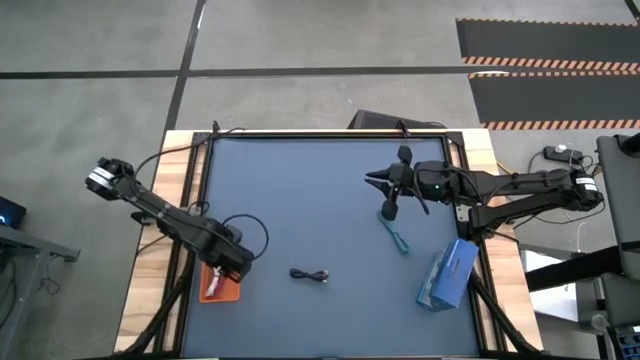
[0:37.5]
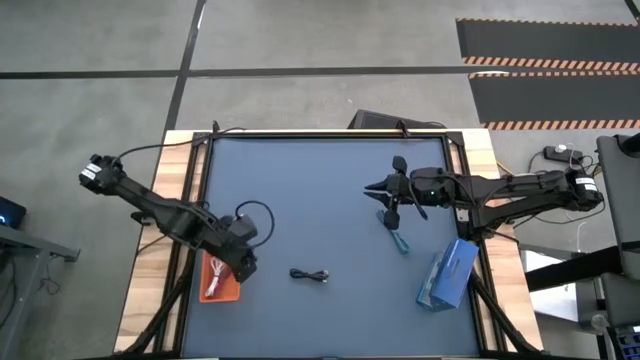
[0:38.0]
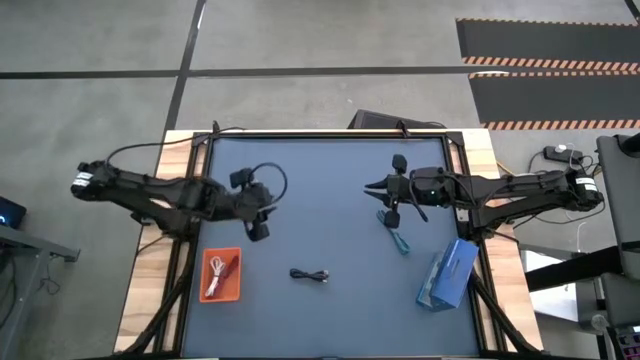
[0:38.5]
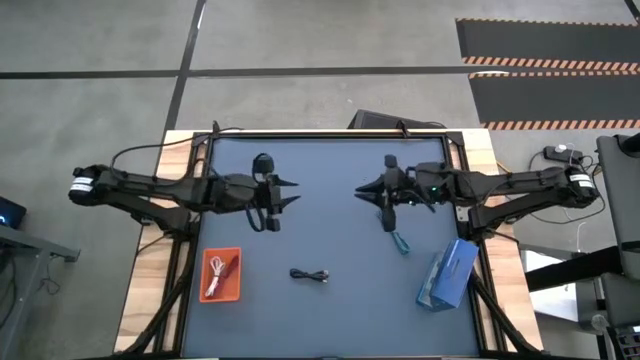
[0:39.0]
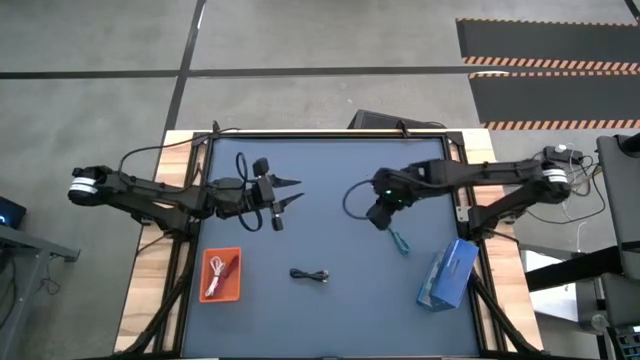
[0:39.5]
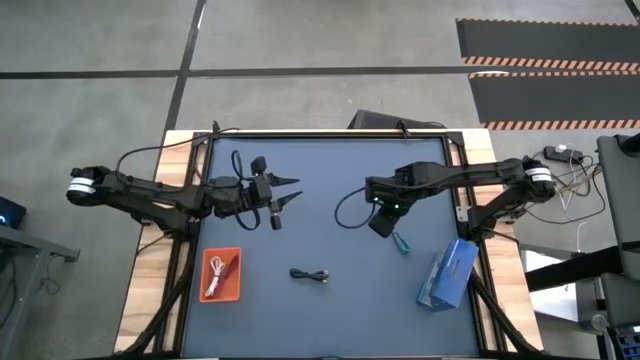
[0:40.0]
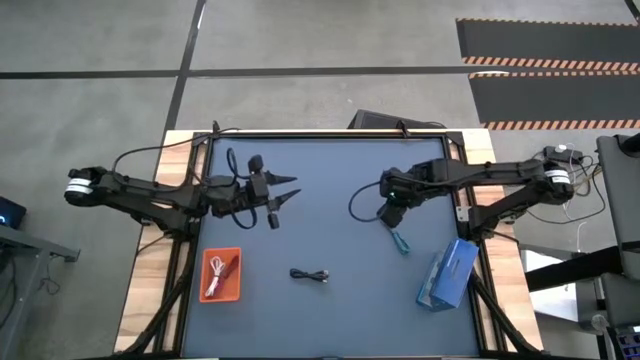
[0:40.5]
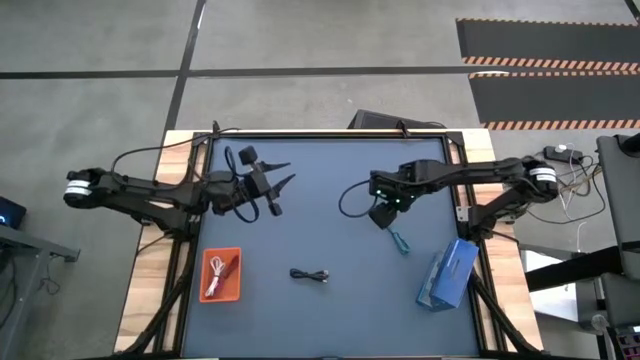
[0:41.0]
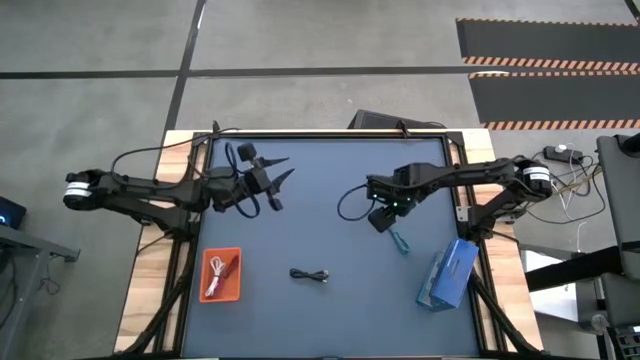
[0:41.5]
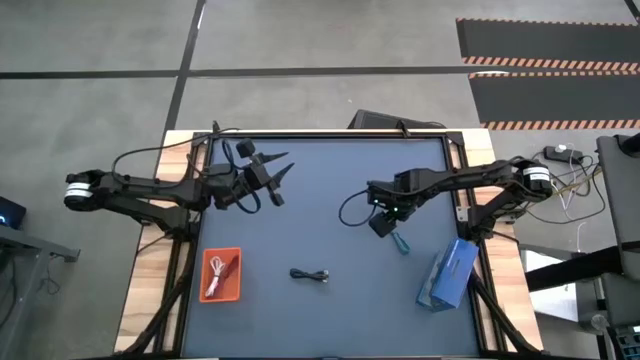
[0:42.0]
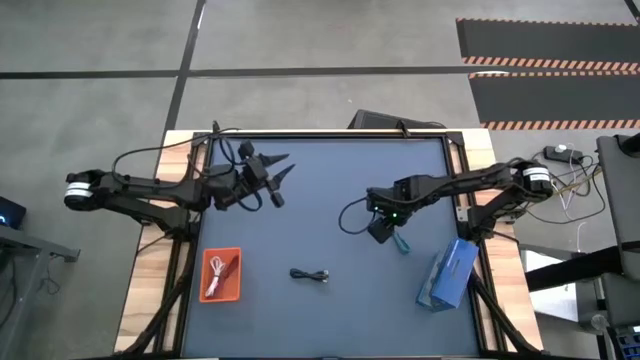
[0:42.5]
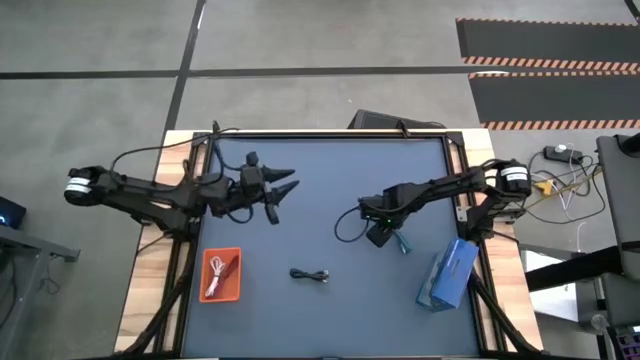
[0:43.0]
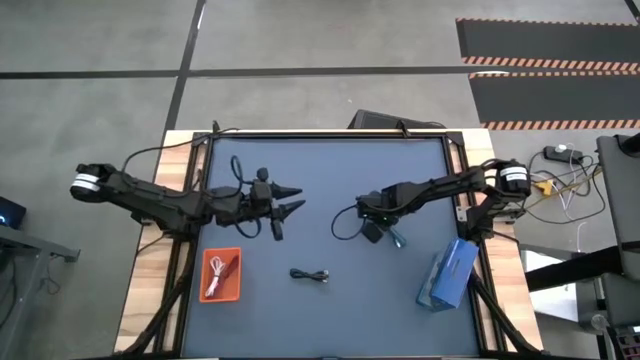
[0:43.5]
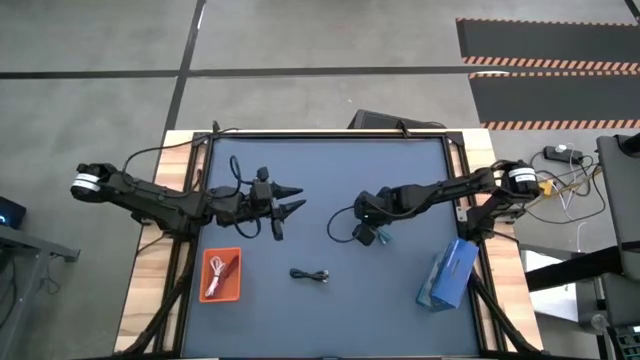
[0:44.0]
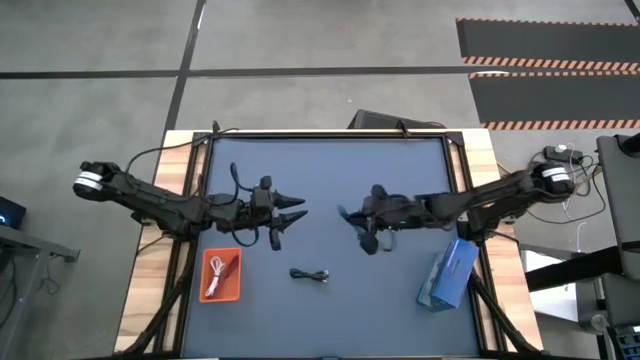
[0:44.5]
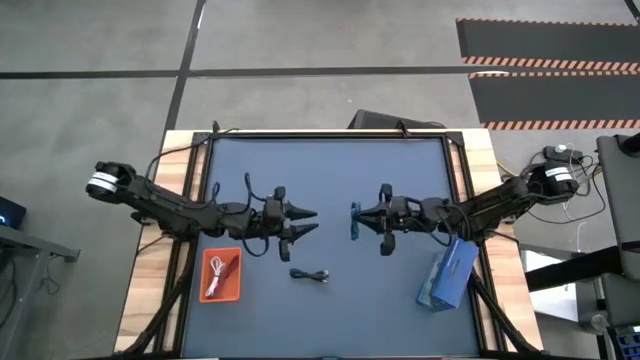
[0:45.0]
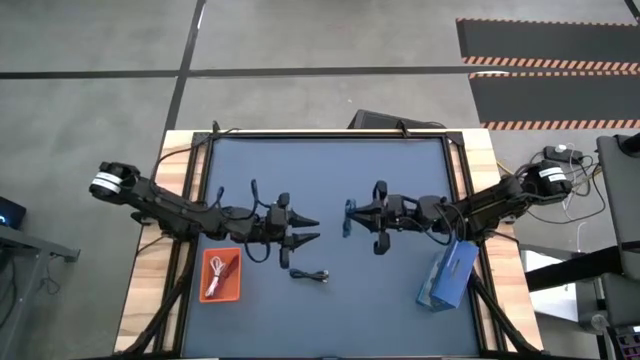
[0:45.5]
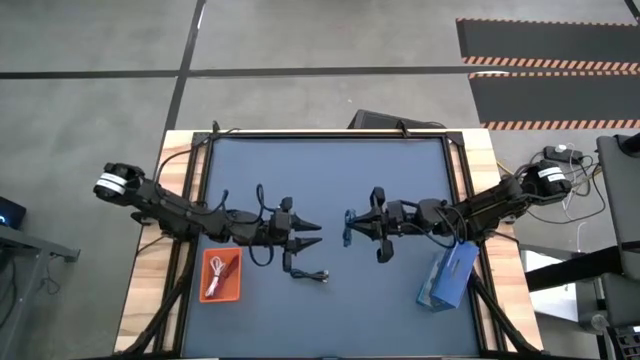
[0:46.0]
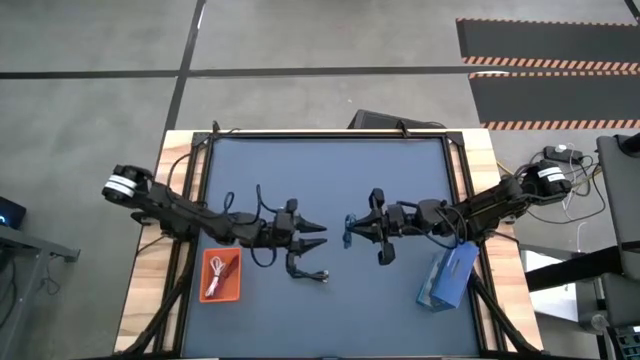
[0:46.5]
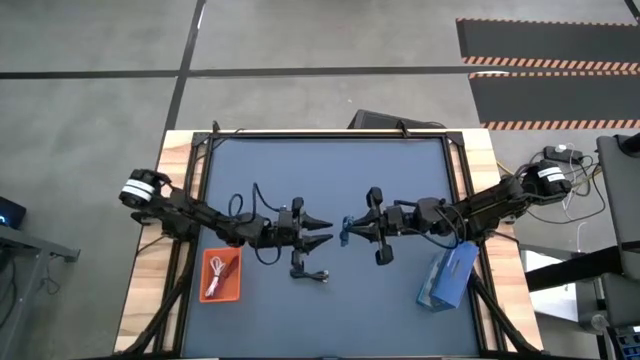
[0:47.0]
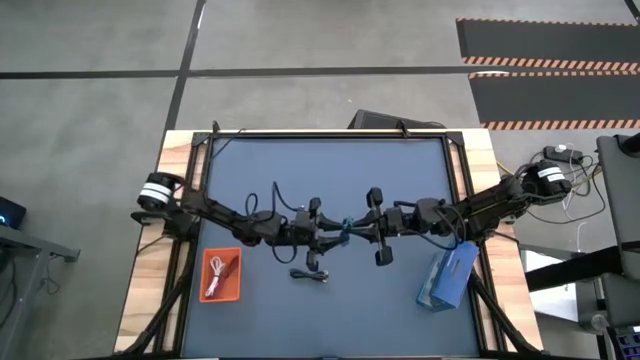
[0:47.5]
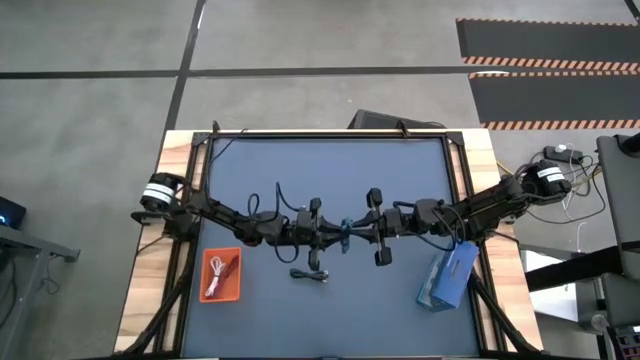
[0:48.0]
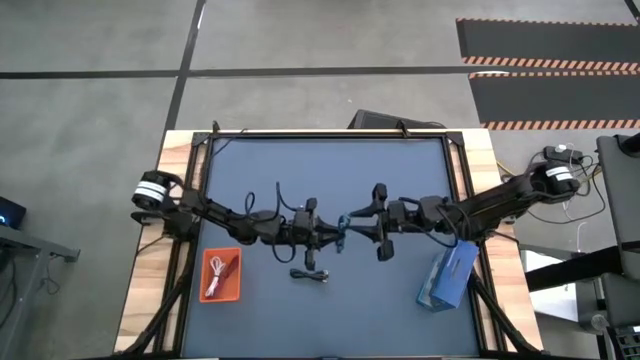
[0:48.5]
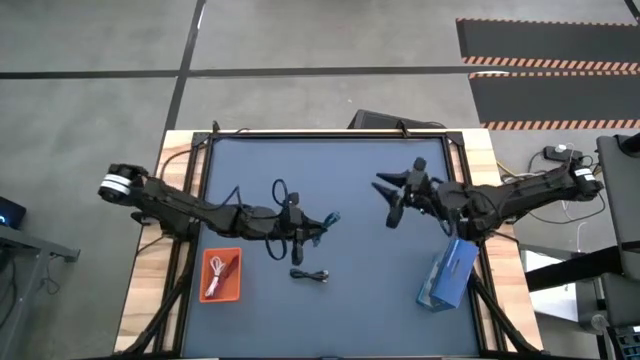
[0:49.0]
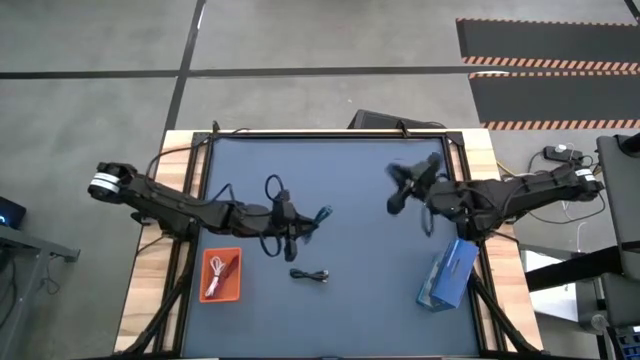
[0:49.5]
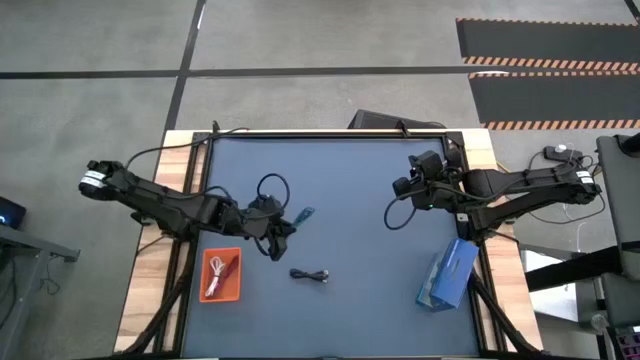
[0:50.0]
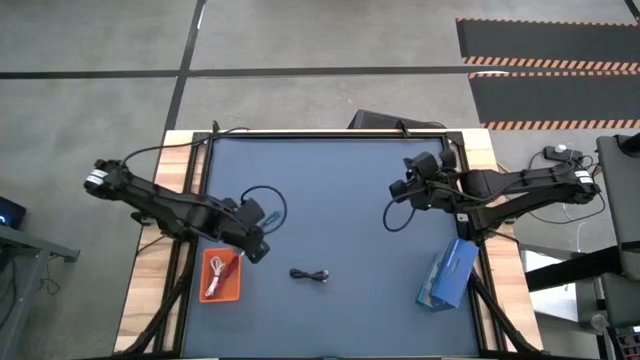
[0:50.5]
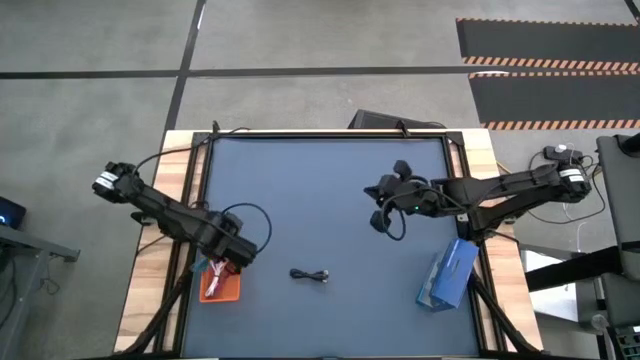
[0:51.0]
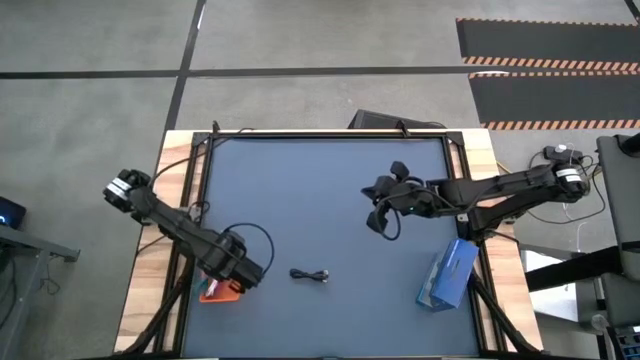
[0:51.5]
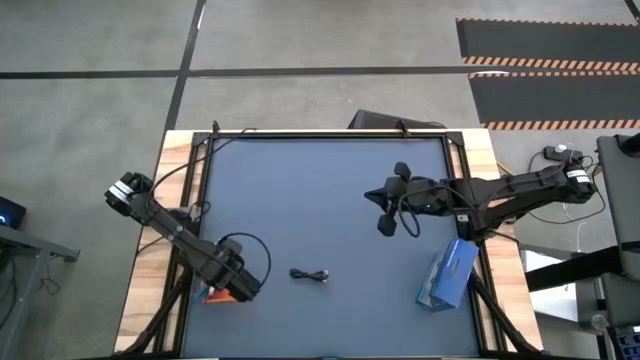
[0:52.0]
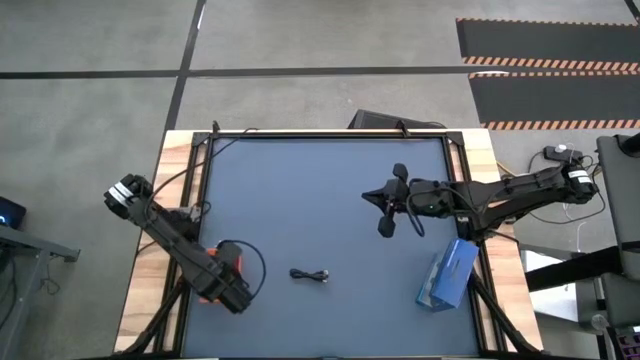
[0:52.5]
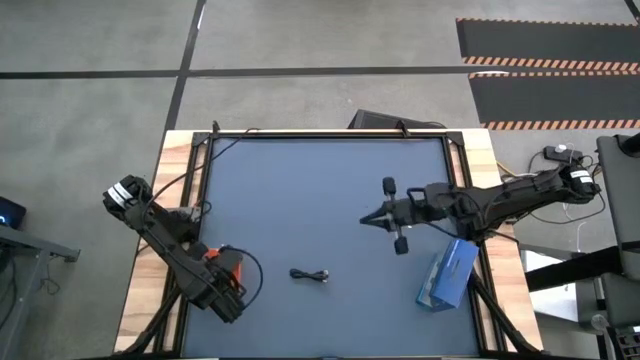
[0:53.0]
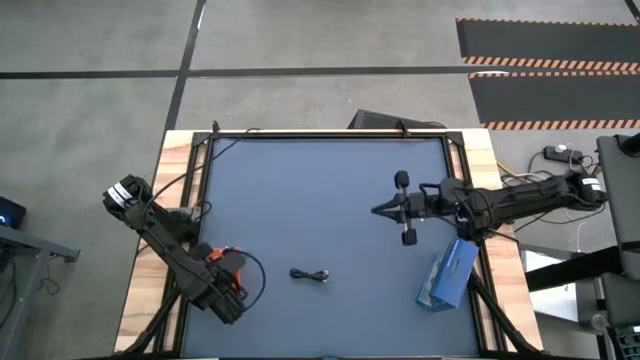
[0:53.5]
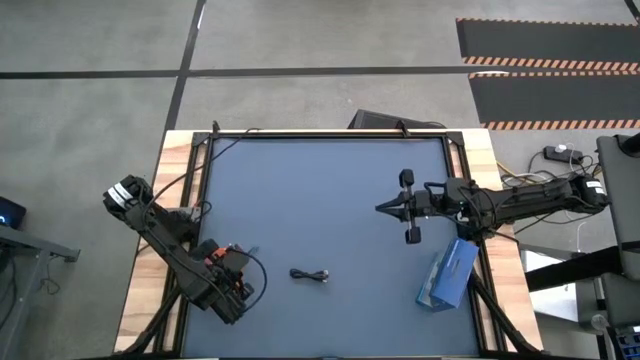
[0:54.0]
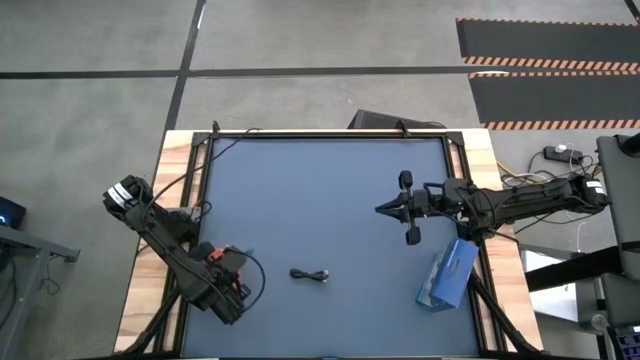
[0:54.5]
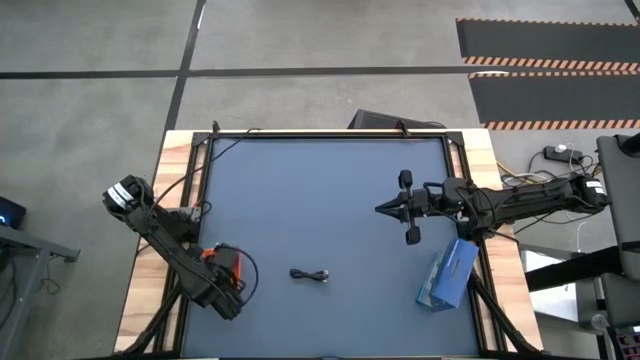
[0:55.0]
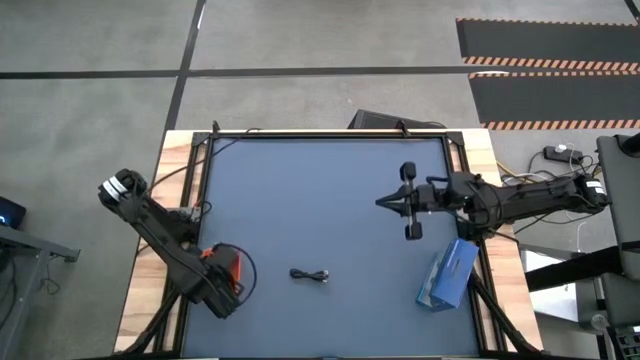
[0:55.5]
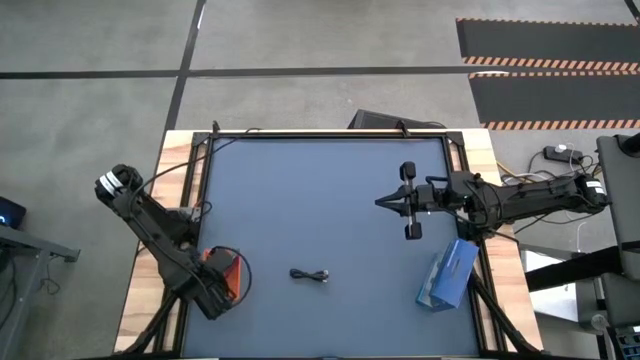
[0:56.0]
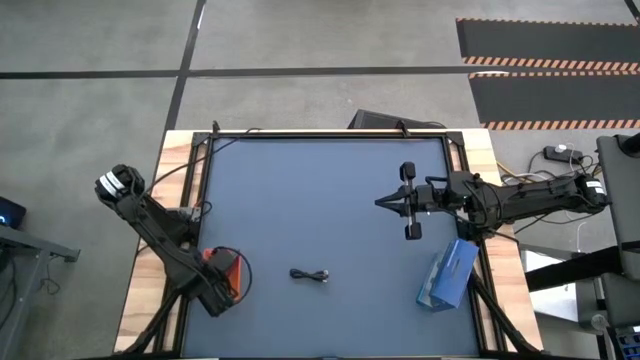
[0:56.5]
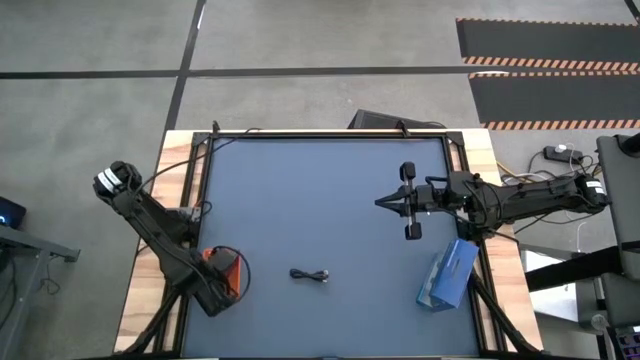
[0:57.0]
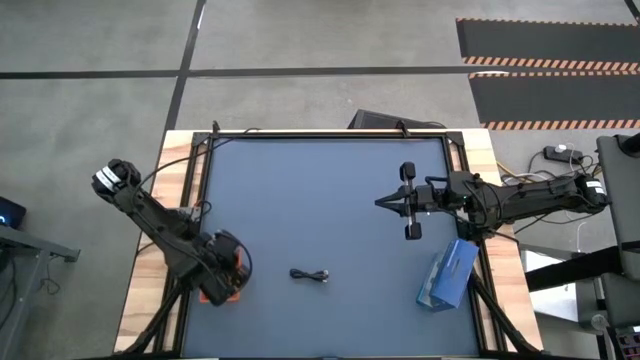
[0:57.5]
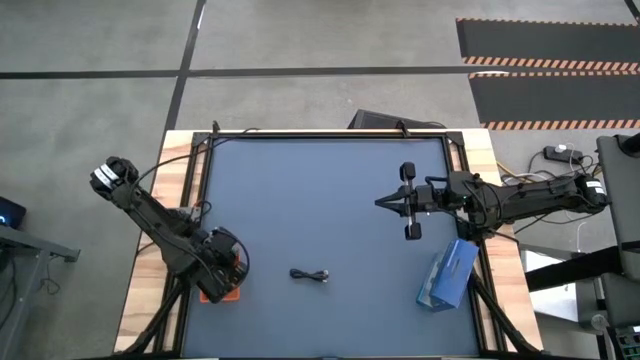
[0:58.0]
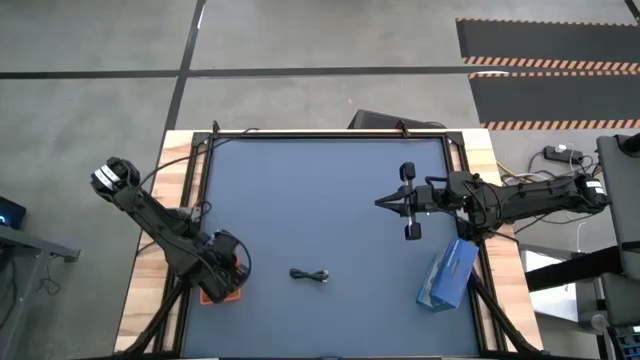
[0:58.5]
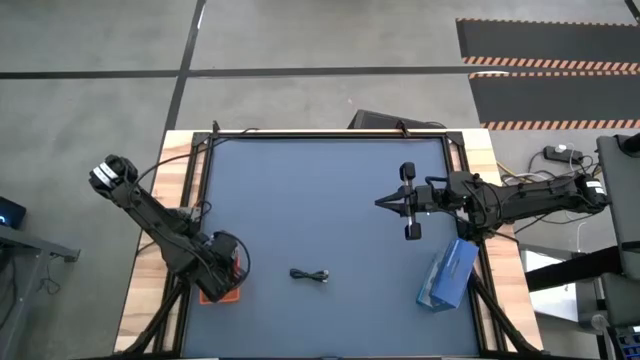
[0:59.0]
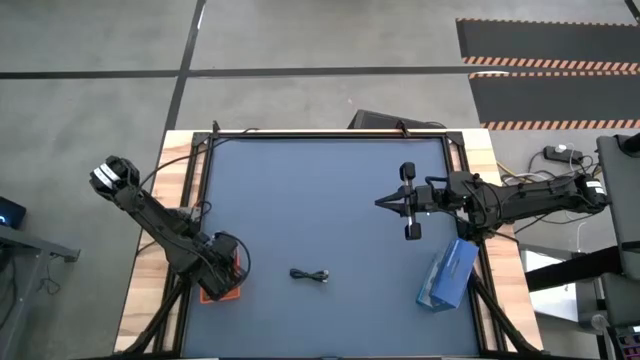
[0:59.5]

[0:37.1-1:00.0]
Task: Pick and place USB-C Cables
Put the blue charger cable into the orange bin
